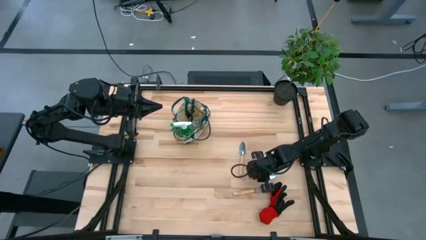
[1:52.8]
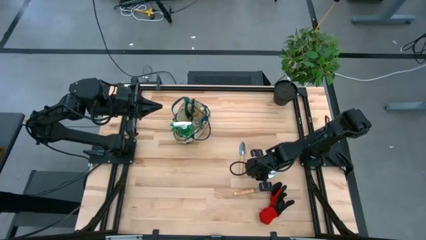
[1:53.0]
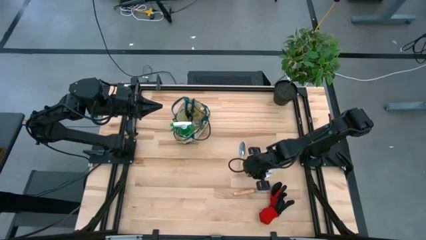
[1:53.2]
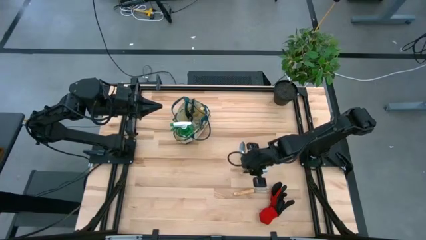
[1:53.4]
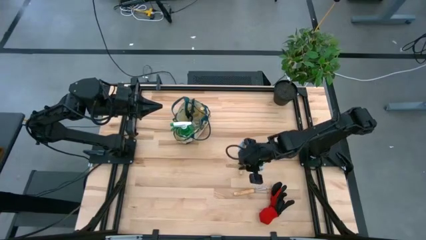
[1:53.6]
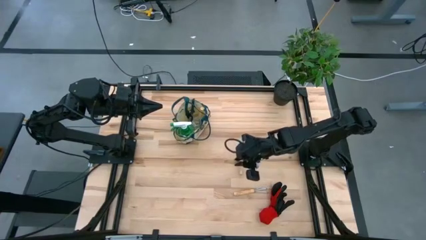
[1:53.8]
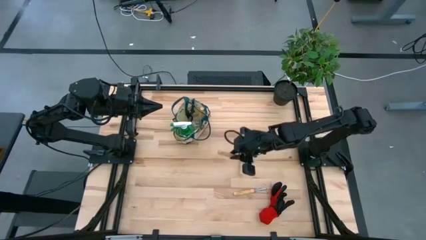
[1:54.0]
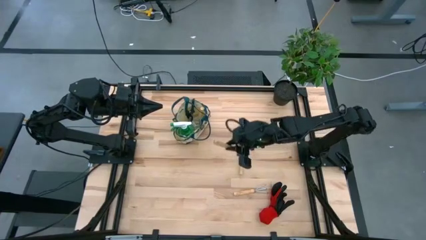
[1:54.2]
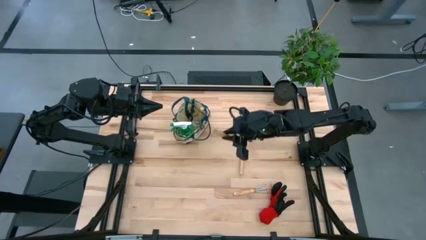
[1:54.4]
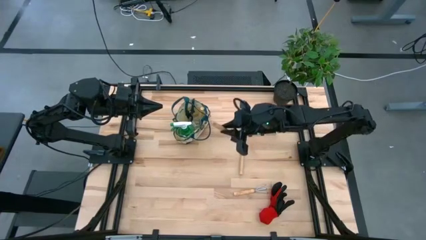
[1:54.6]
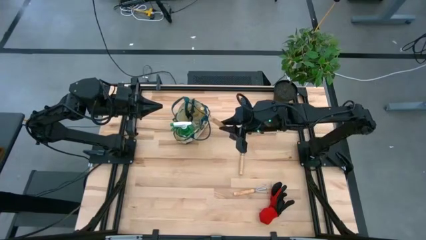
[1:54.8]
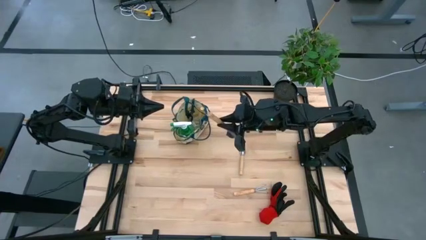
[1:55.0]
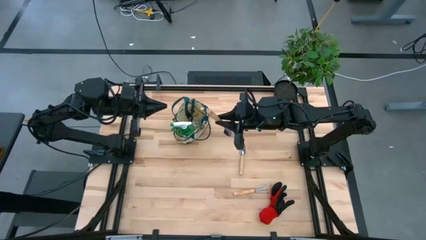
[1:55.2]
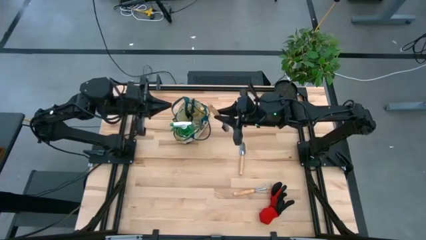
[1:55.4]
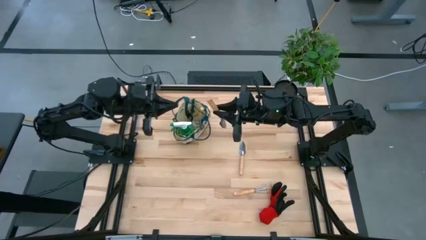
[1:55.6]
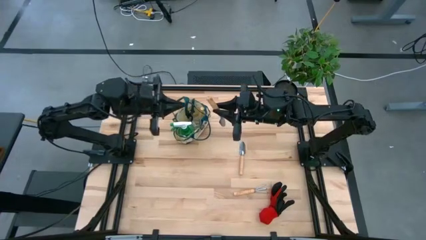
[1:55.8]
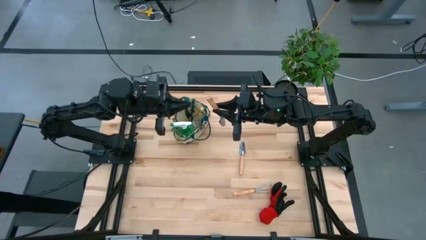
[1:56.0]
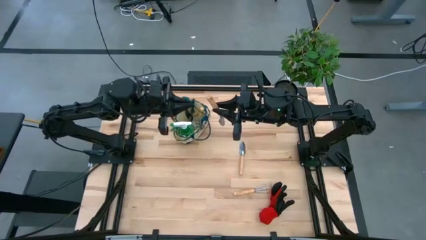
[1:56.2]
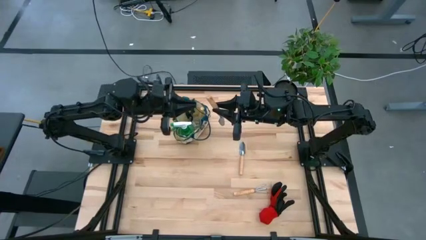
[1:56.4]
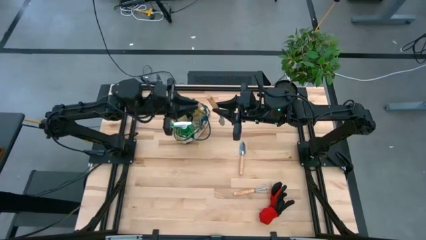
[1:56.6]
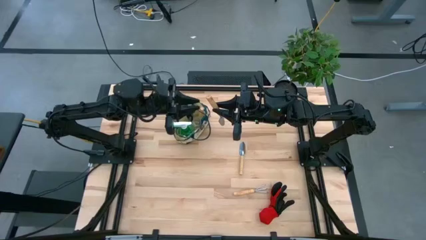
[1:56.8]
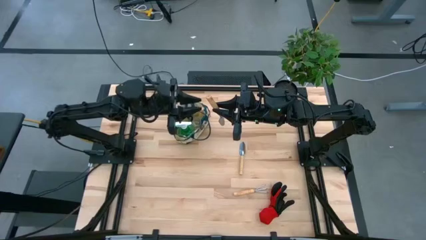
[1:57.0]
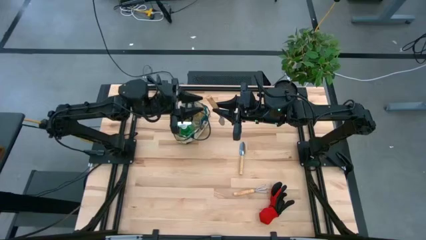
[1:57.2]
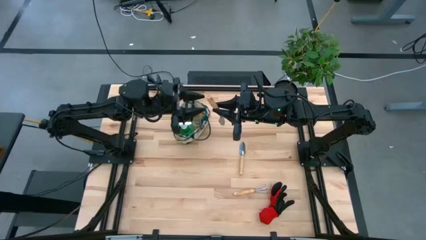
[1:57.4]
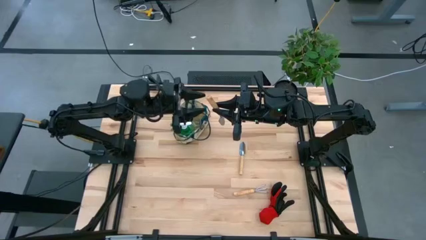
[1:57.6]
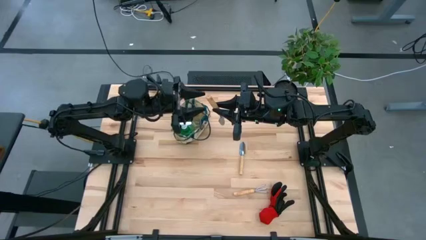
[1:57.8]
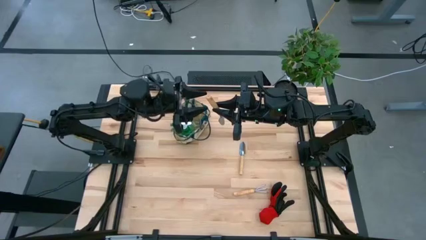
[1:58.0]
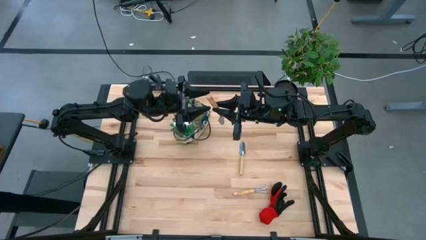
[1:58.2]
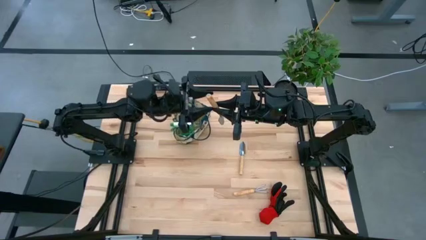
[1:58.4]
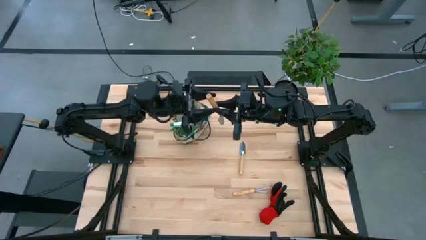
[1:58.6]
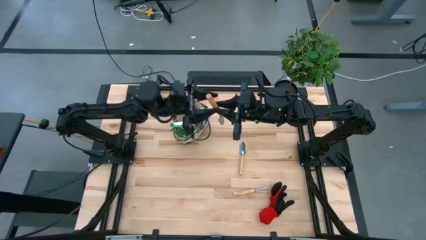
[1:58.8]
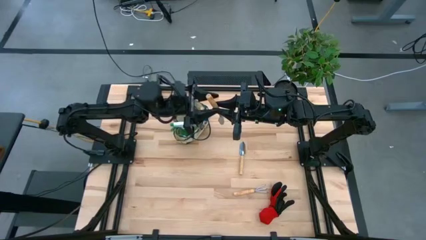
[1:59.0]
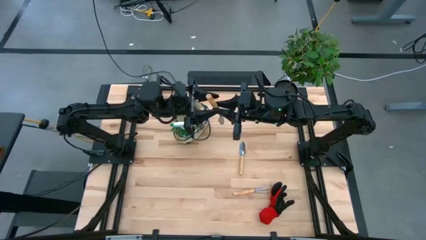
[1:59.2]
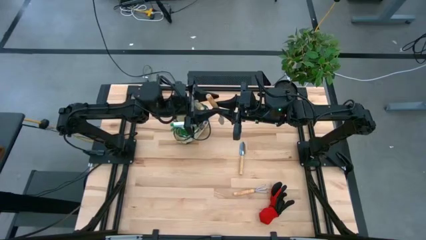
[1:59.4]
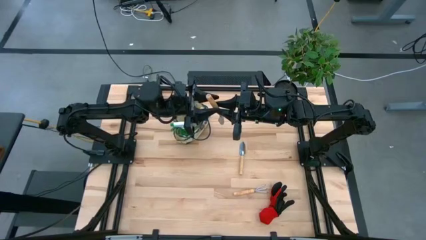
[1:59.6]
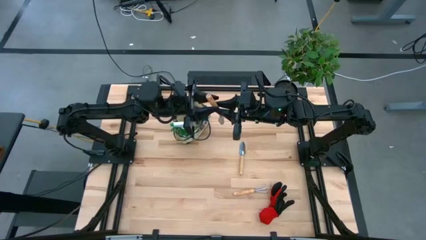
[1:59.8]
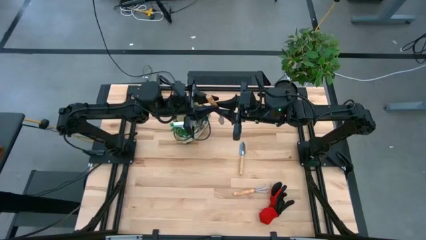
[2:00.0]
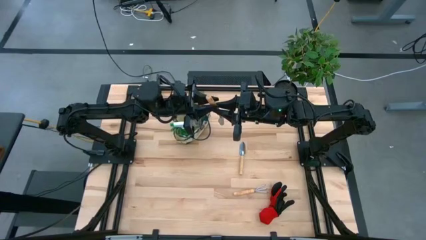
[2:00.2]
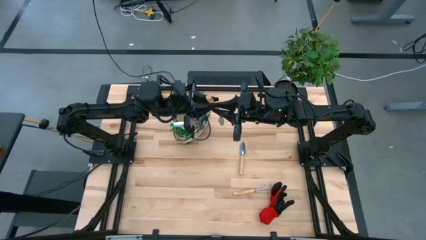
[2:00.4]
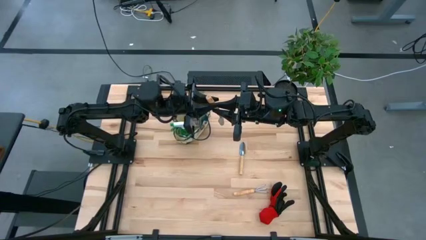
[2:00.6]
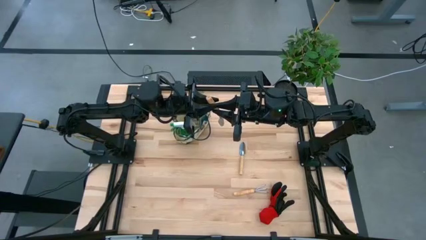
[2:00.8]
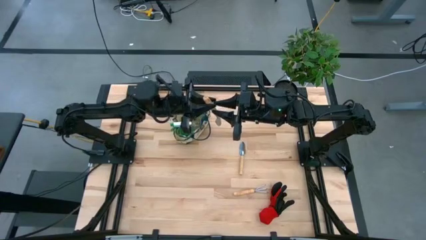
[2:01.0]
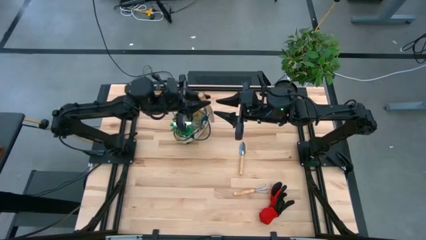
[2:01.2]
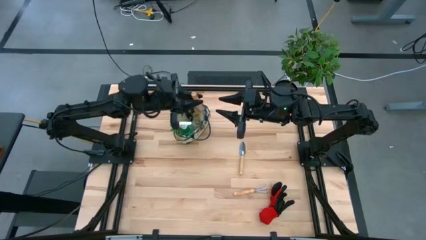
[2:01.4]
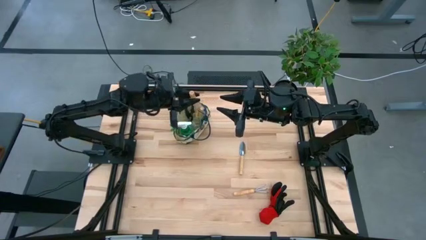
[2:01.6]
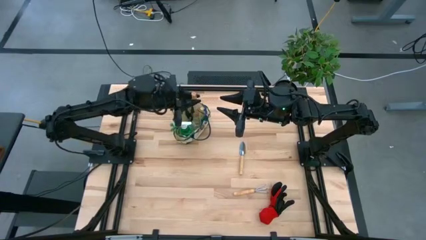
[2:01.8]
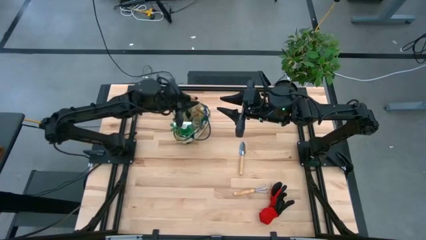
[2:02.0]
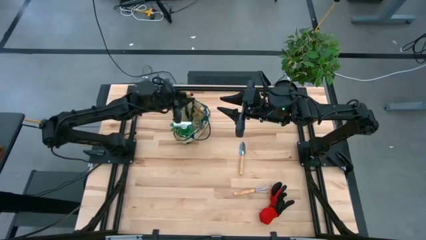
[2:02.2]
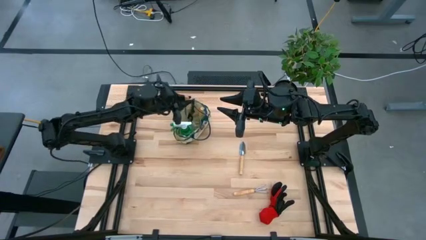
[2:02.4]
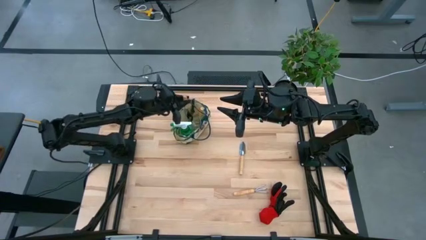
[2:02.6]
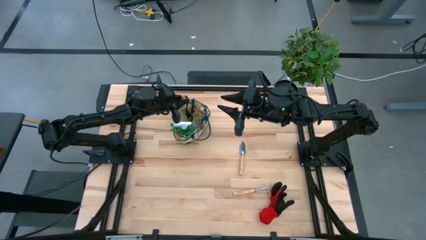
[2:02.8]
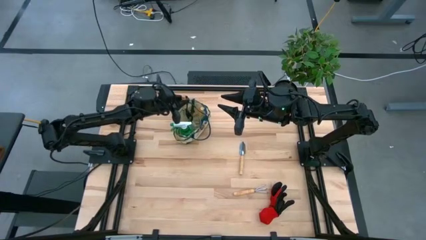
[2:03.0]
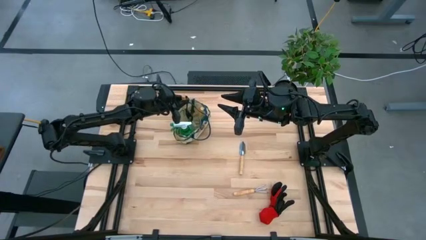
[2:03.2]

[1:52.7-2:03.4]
Task: Pick & Place Garden tools in Gardening bag
Put the right brown trowel into the gardening bag

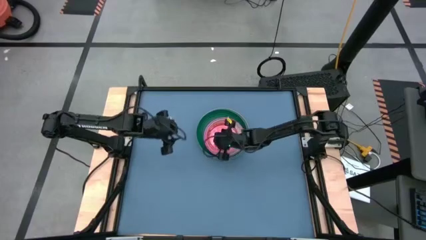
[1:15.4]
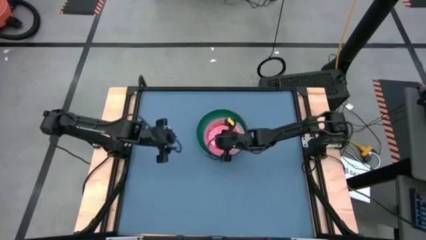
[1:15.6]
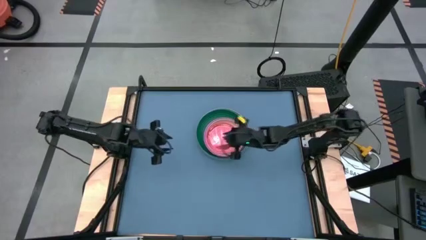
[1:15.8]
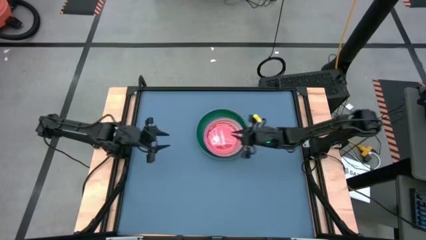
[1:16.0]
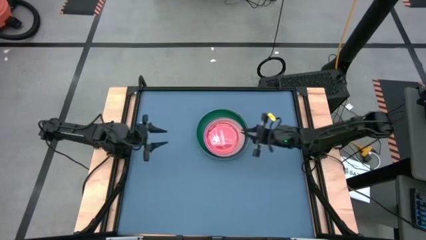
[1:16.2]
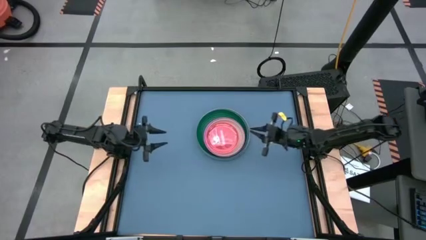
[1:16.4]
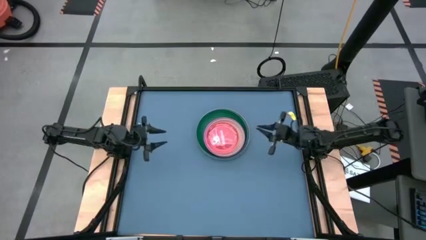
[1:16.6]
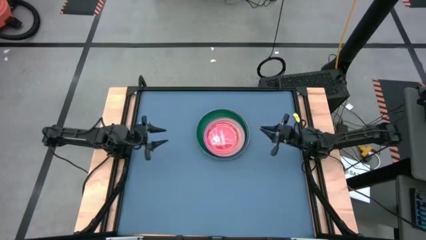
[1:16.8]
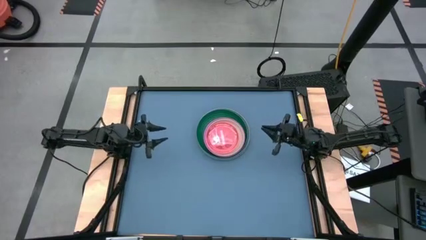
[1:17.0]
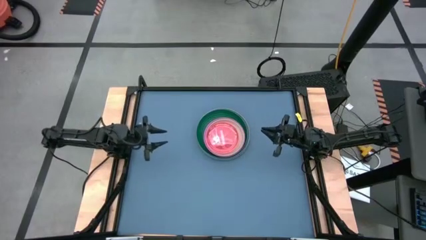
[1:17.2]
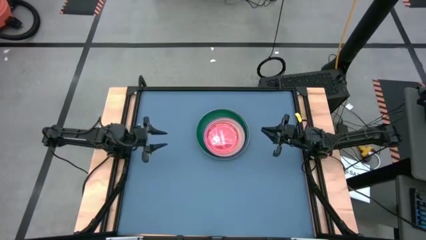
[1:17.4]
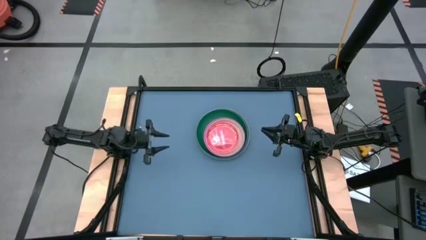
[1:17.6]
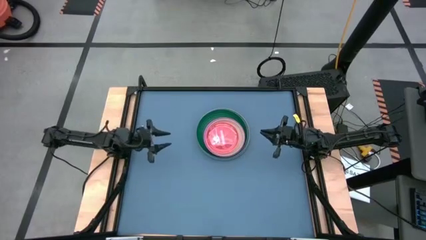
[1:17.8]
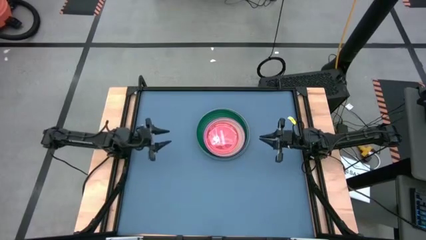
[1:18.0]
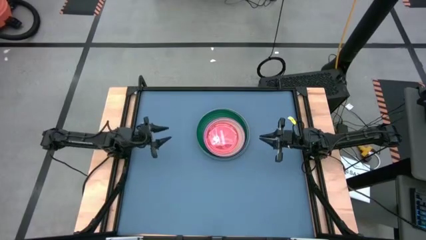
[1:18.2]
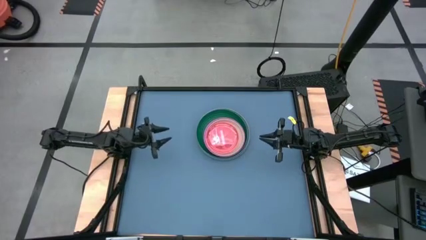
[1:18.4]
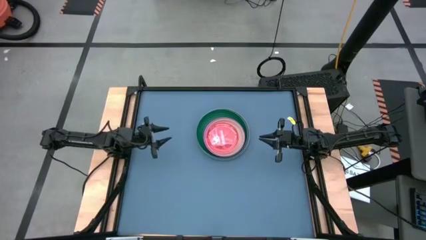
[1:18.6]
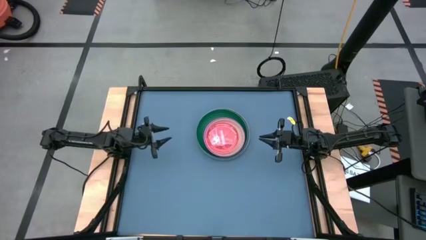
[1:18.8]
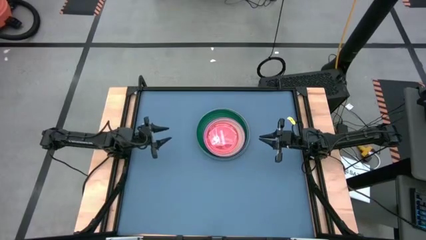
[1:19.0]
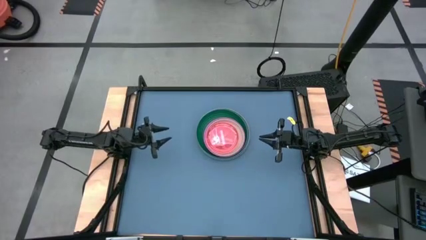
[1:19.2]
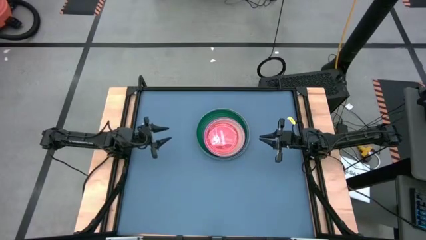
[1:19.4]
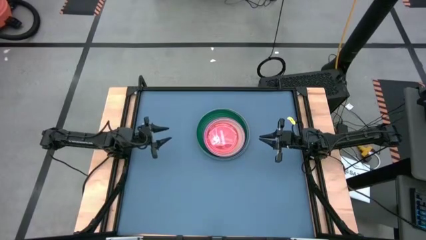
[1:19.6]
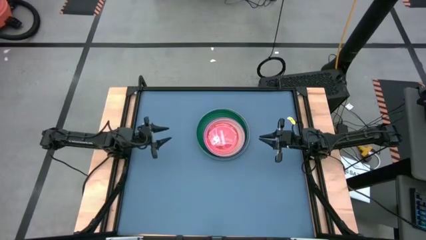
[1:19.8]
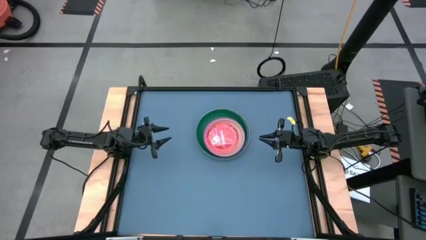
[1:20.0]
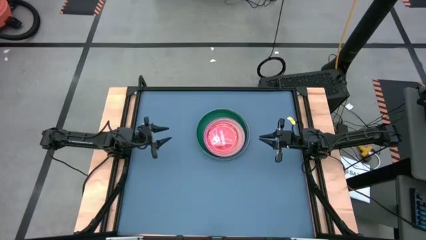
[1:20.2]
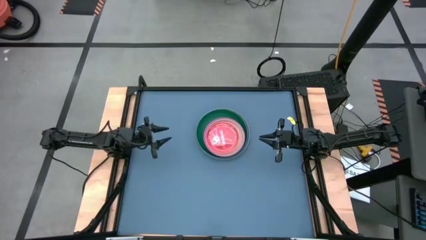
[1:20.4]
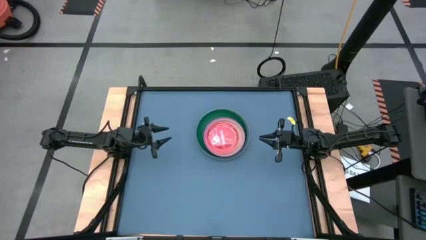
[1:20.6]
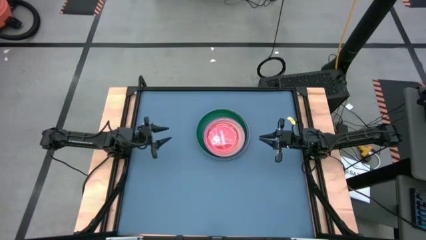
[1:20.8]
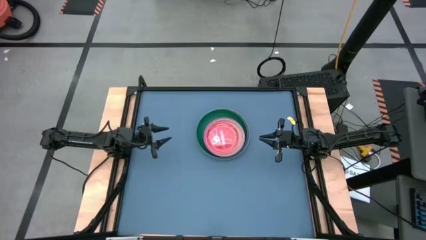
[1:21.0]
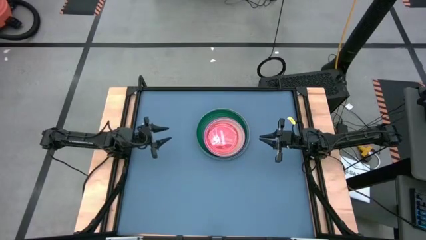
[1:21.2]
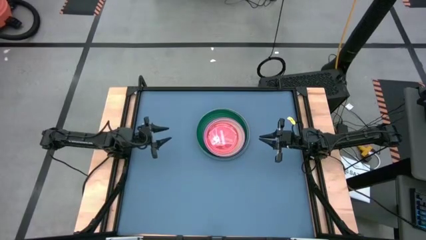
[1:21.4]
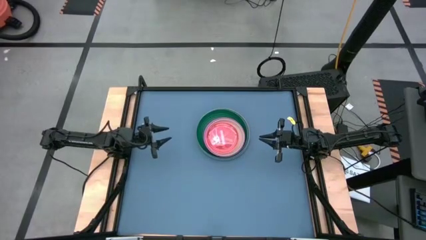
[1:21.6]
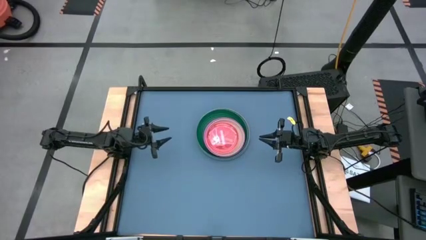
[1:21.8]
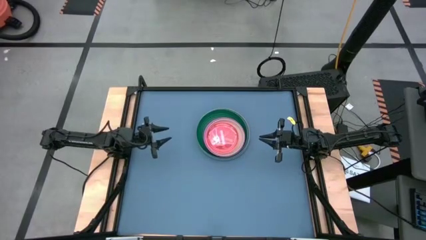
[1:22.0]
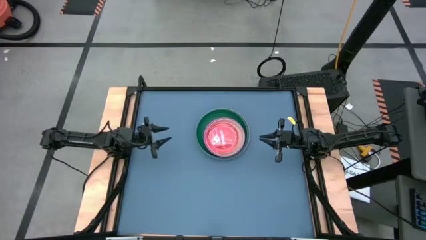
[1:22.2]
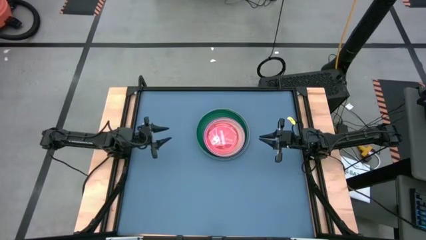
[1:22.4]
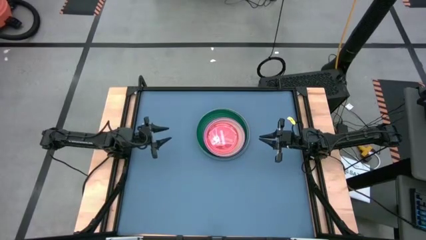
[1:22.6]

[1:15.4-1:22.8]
Task: Stack plastic plates
Return to Home Position
